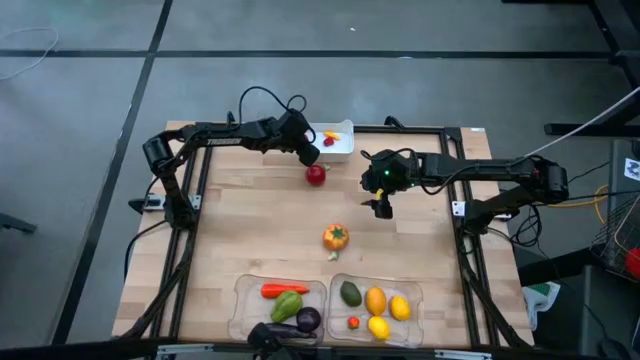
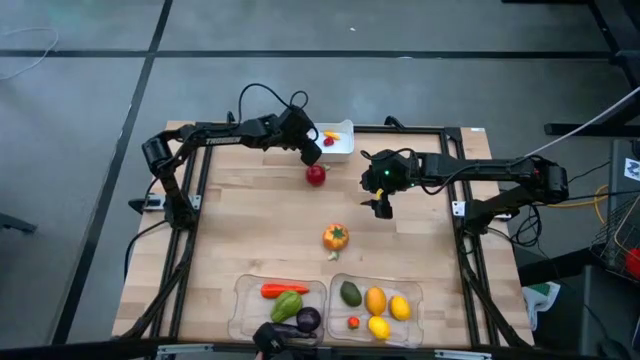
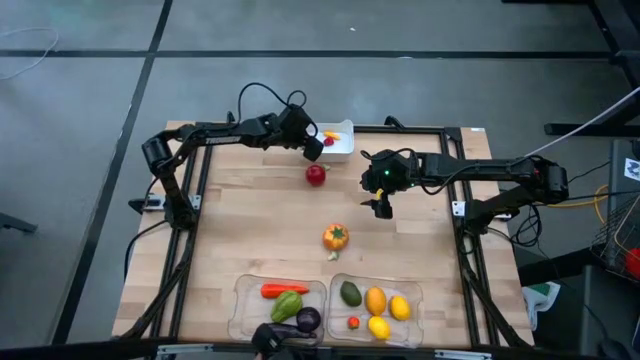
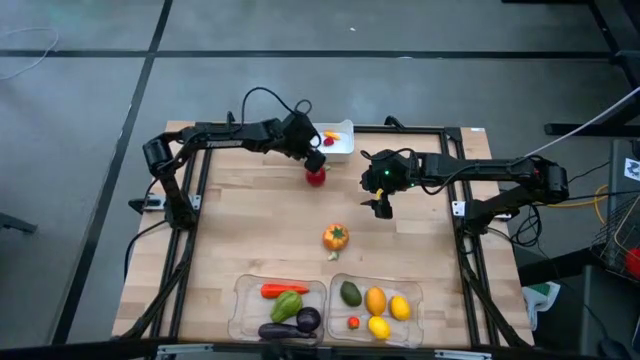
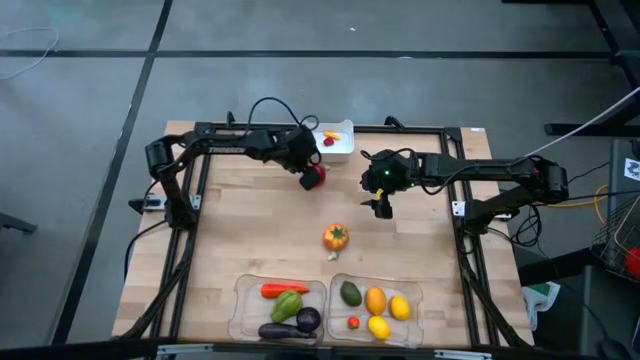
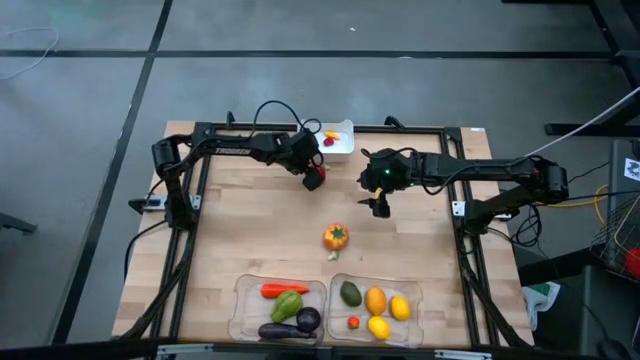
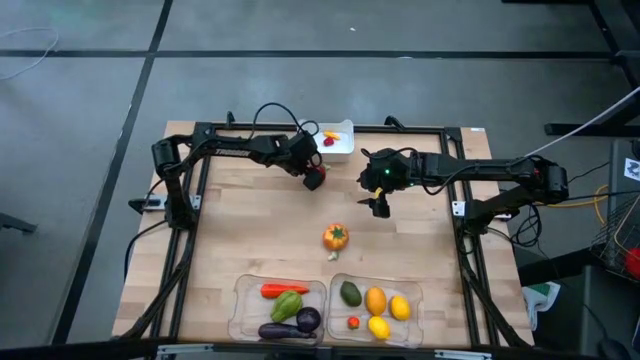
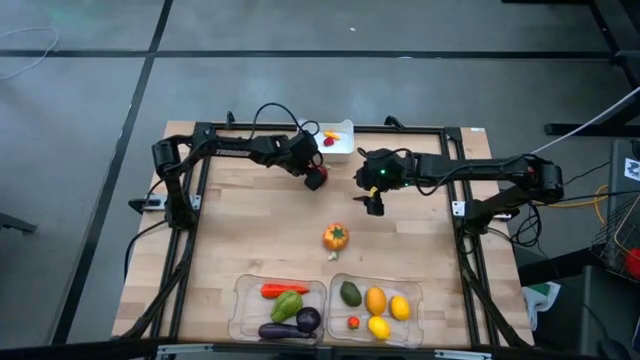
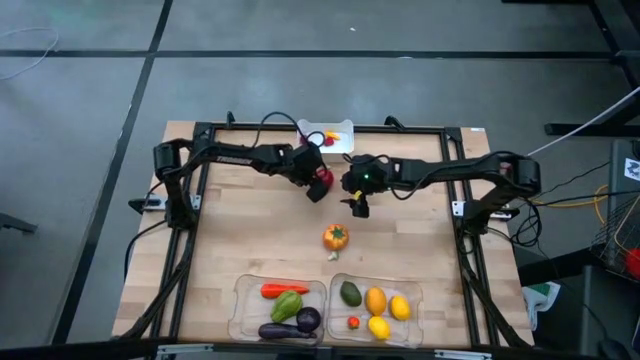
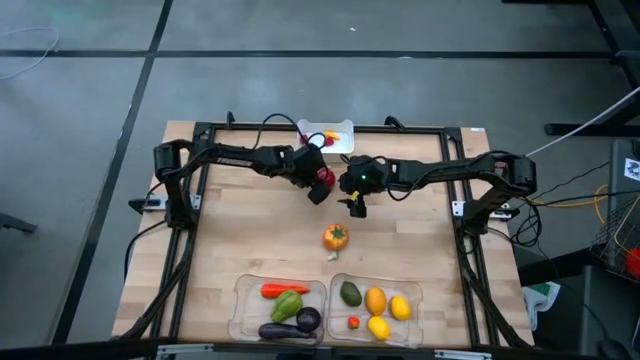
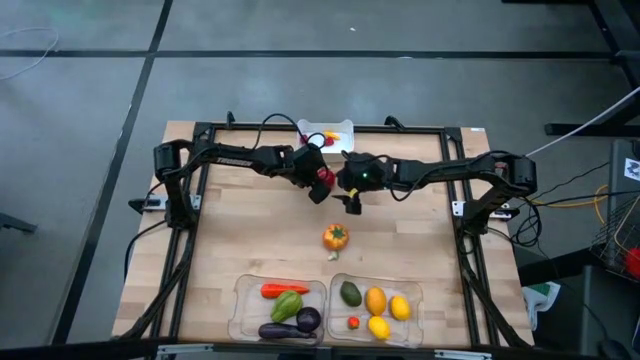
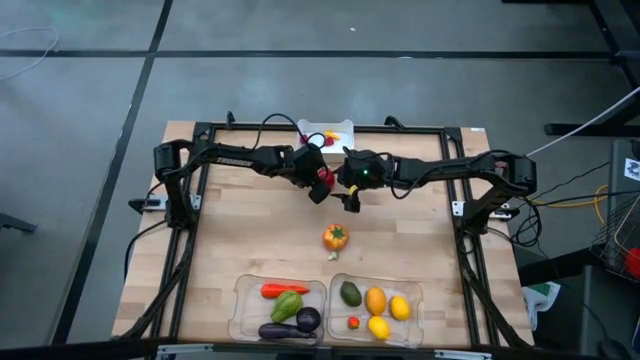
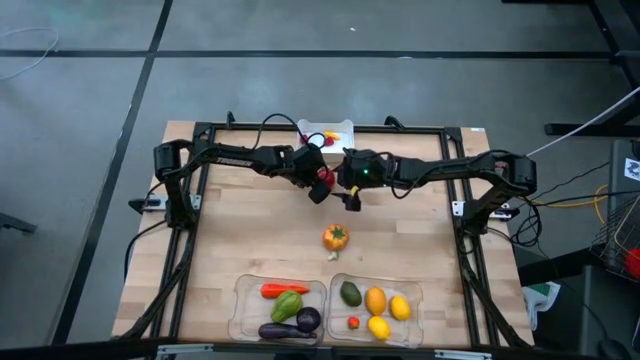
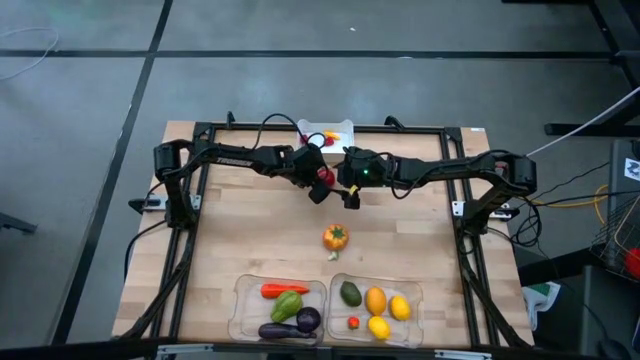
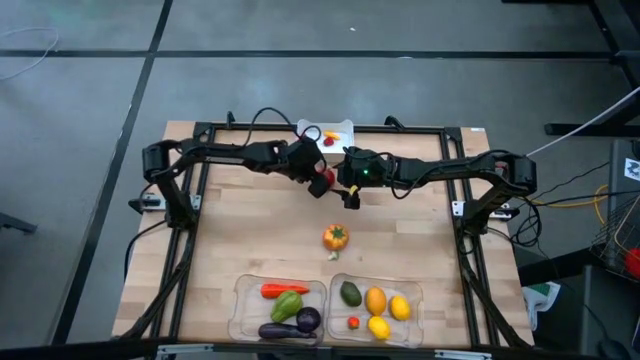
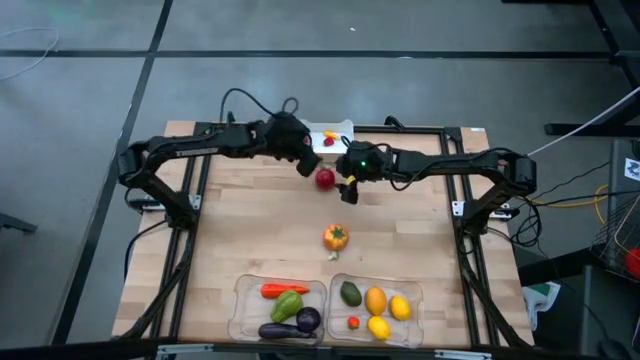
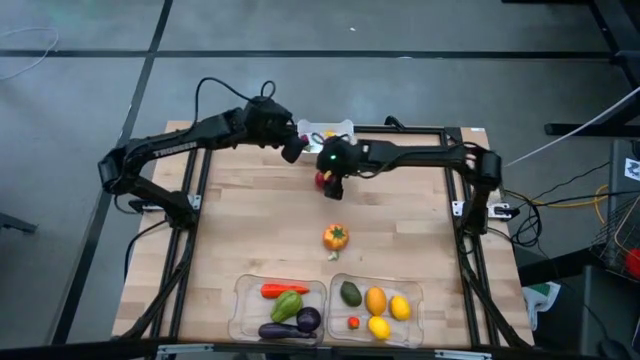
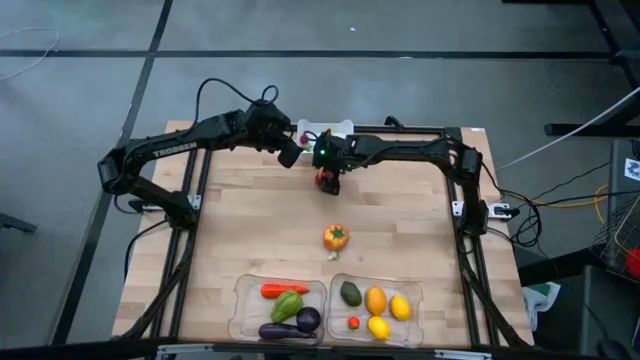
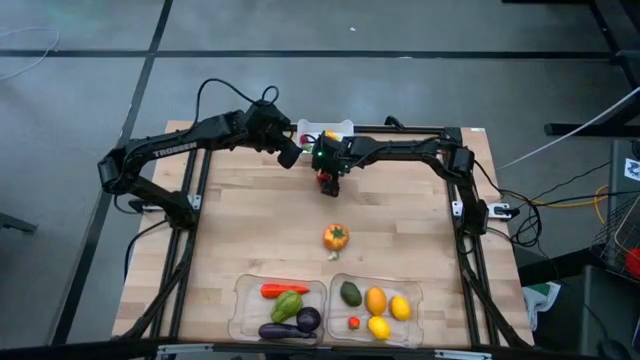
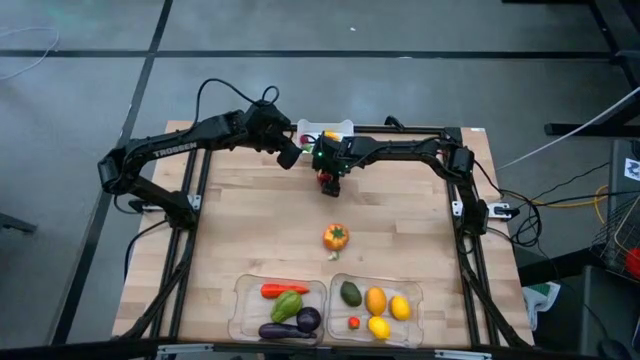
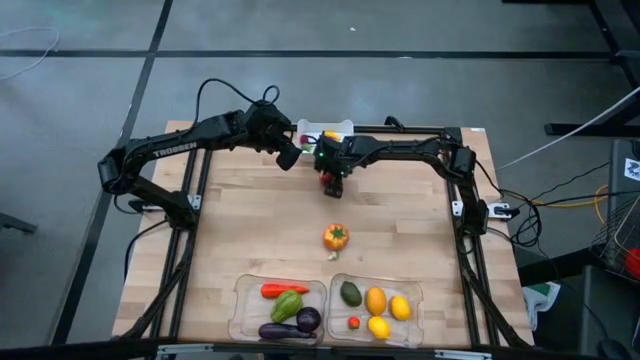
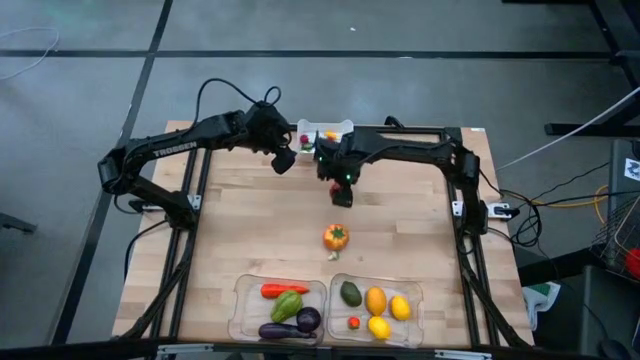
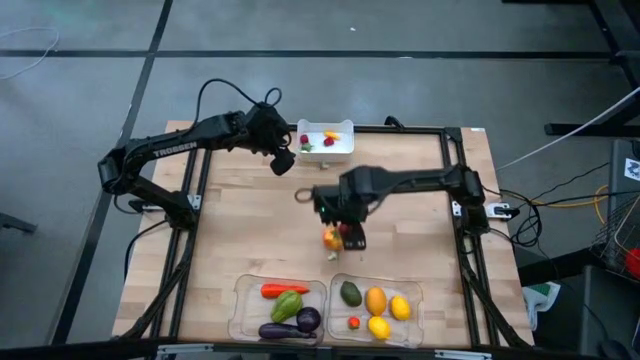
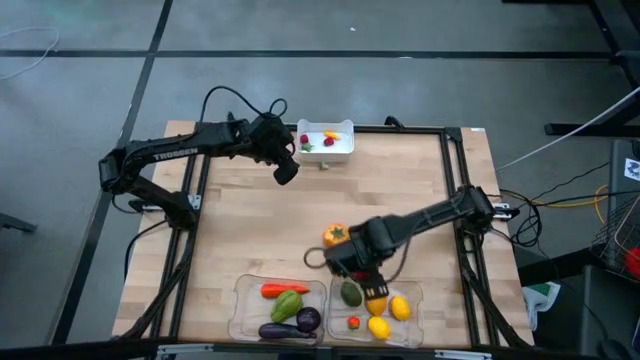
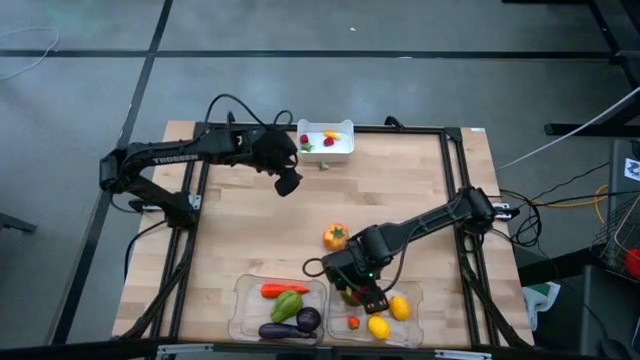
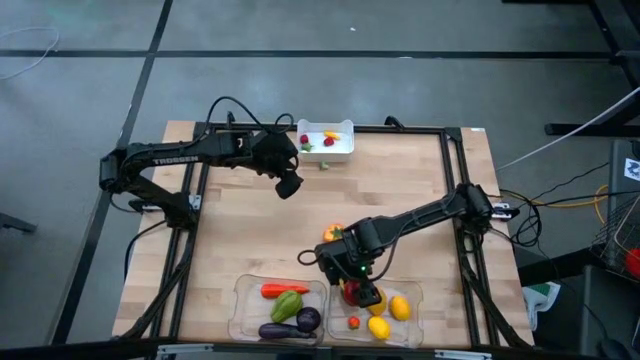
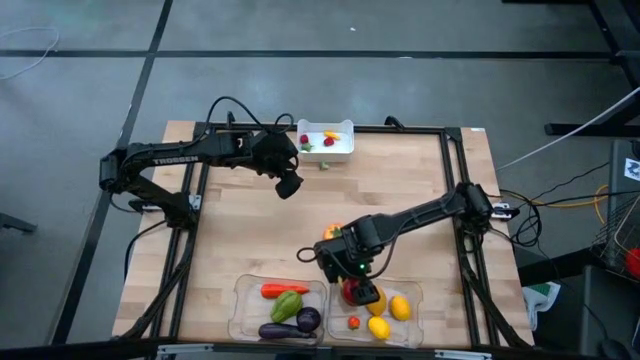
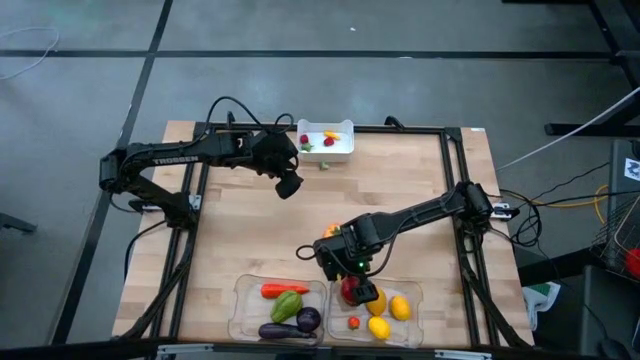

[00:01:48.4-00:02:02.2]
Task: Sort produce into baskets
Put the red tomato into the right transparent bin

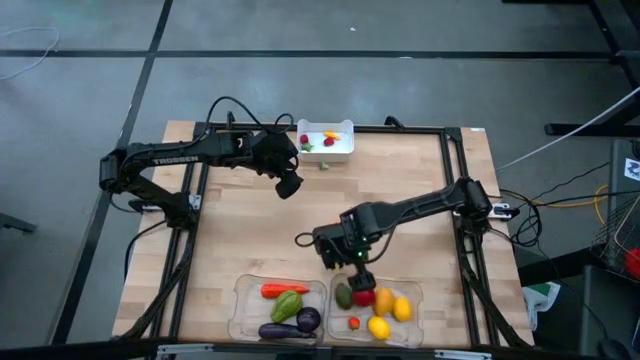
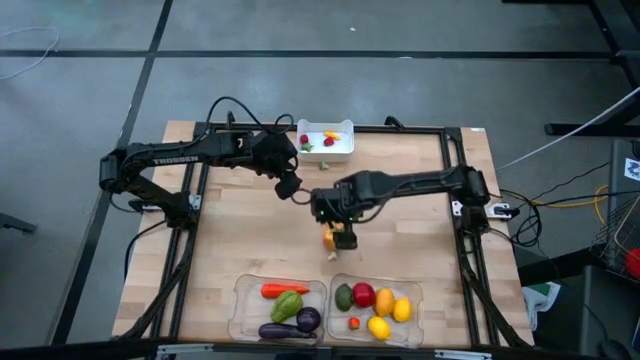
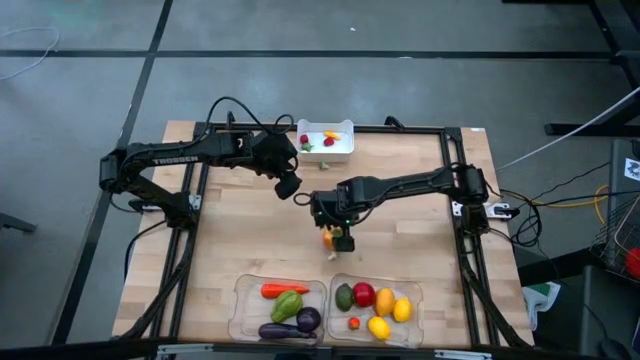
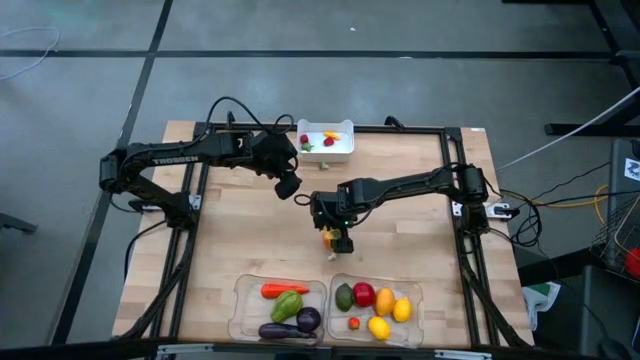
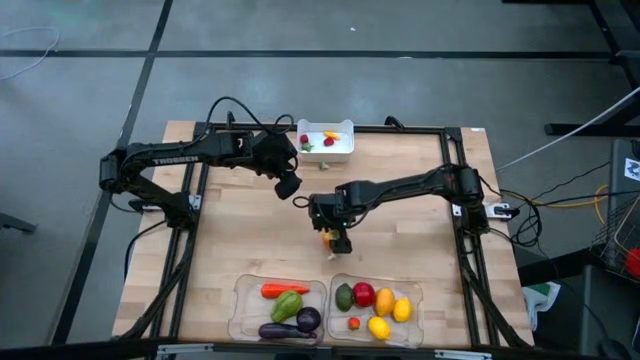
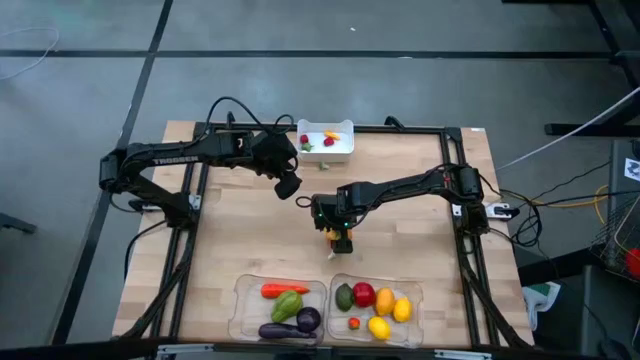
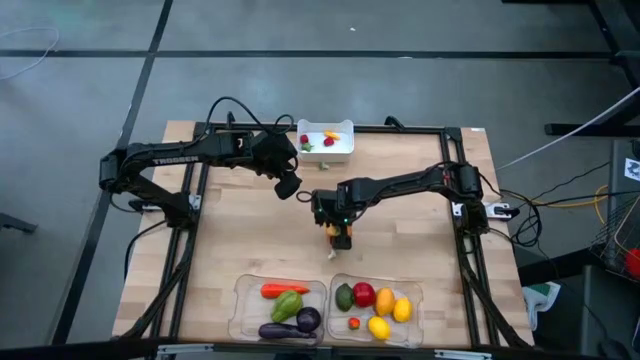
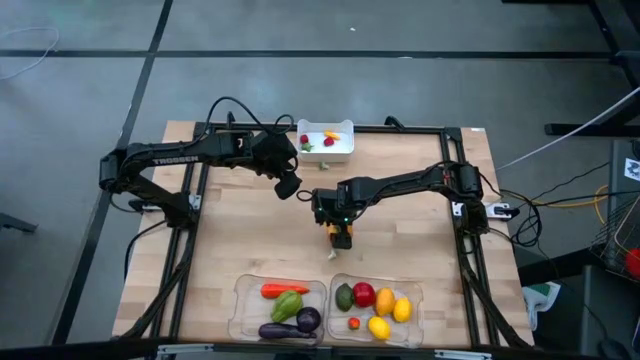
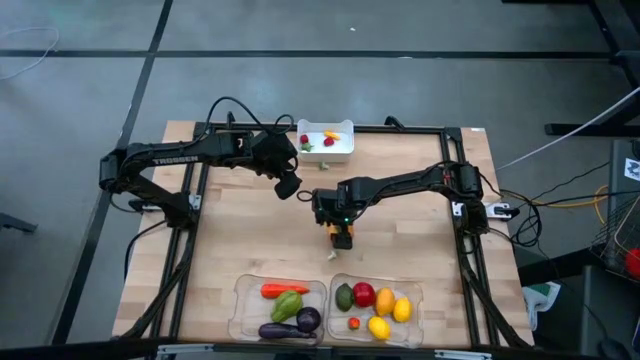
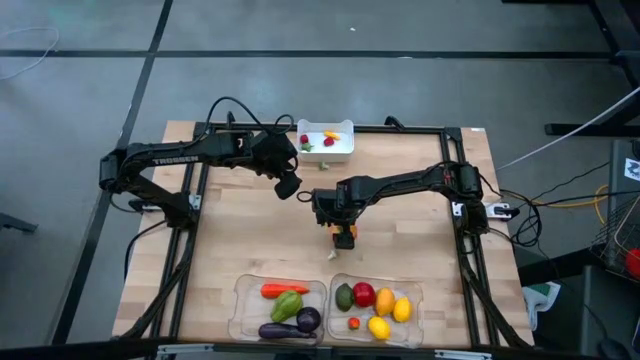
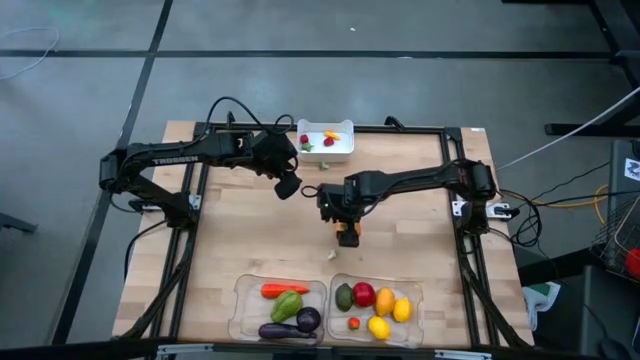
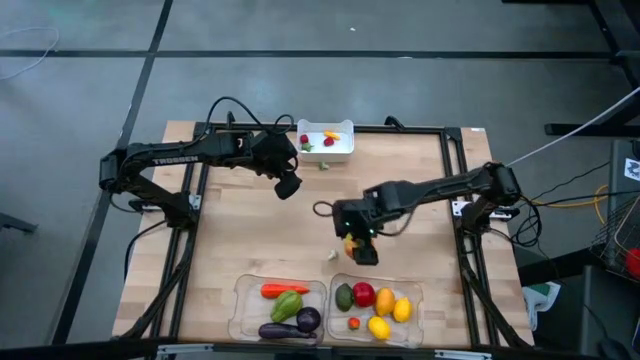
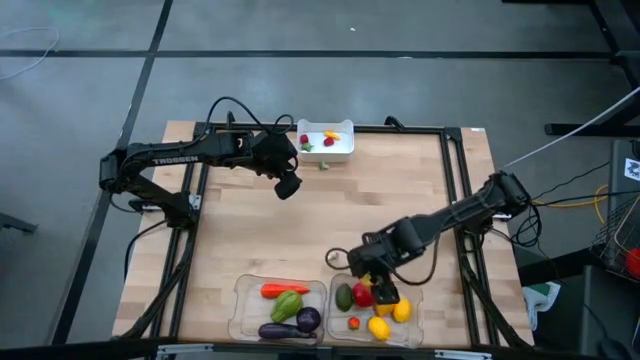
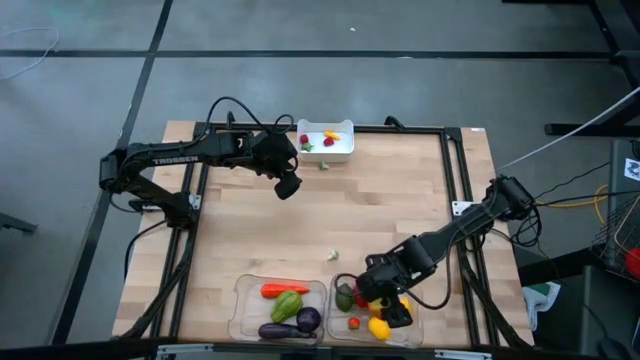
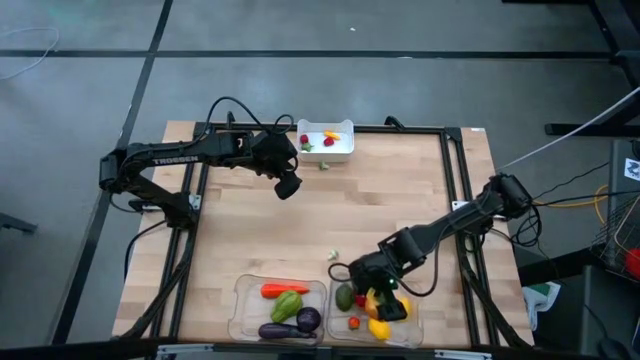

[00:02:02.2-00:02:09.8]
Put the orange tomato into the right transparent bin
